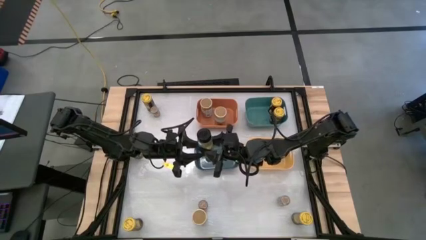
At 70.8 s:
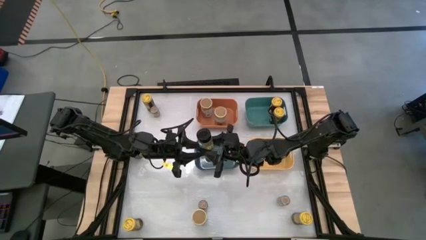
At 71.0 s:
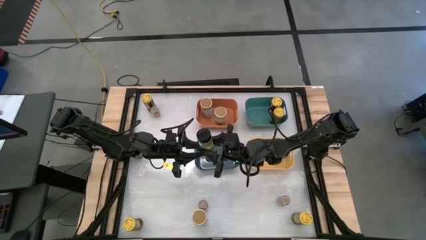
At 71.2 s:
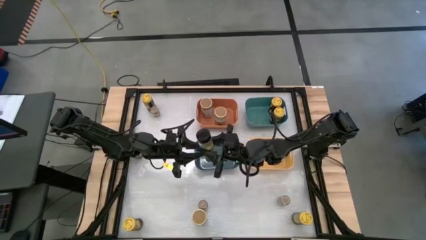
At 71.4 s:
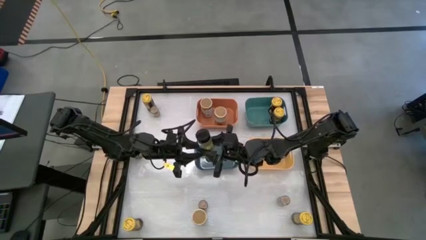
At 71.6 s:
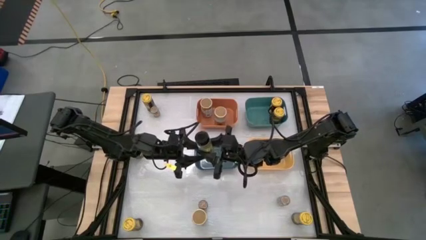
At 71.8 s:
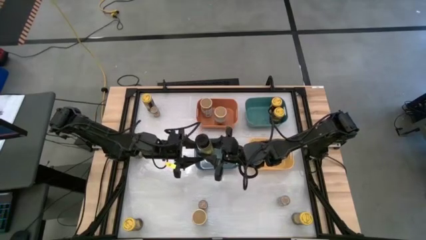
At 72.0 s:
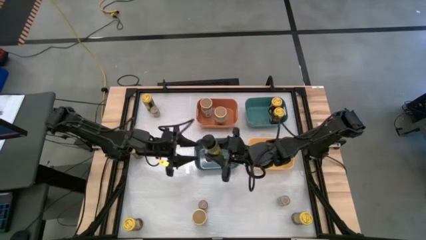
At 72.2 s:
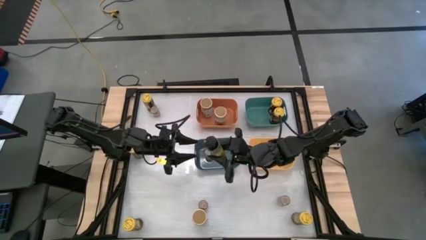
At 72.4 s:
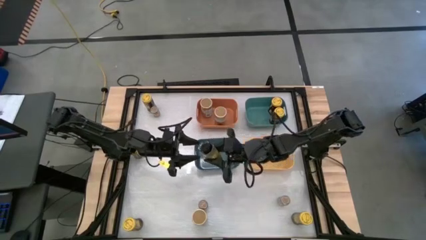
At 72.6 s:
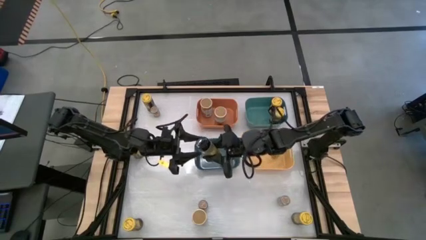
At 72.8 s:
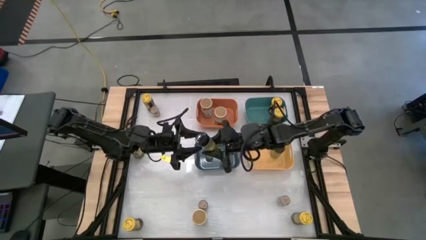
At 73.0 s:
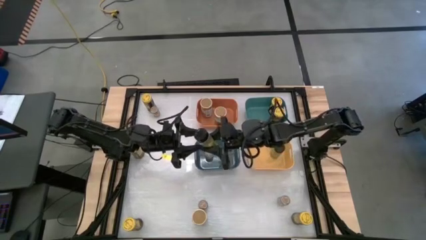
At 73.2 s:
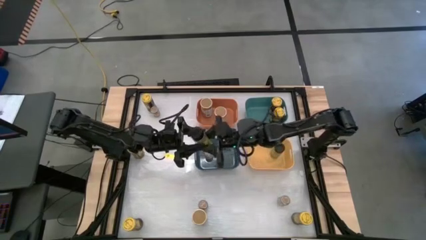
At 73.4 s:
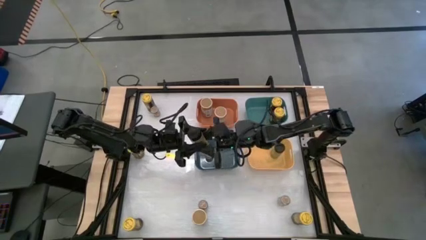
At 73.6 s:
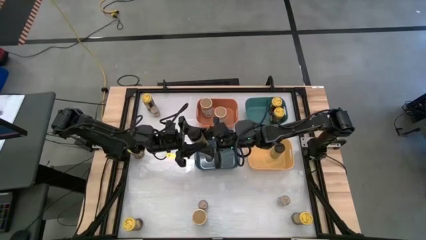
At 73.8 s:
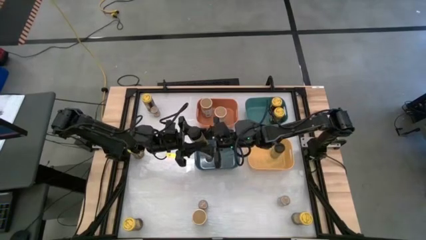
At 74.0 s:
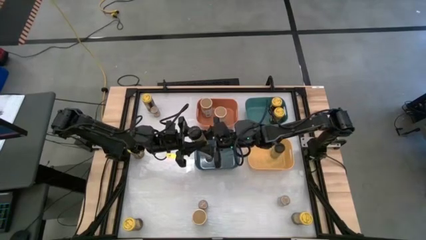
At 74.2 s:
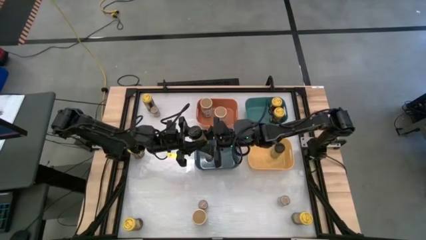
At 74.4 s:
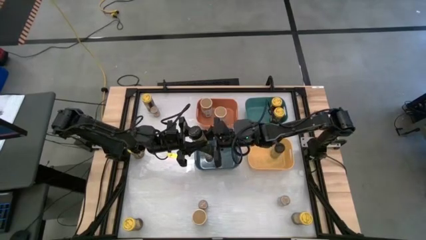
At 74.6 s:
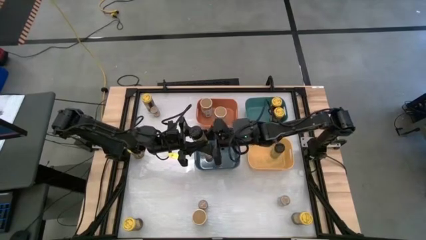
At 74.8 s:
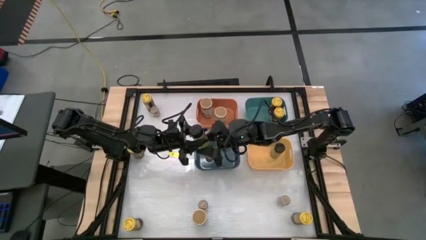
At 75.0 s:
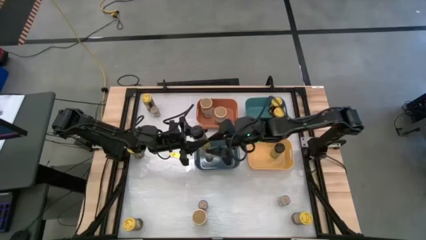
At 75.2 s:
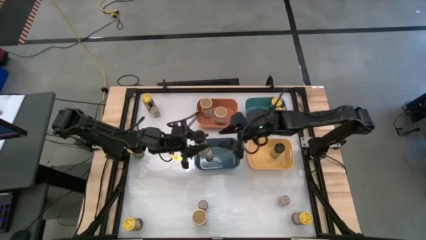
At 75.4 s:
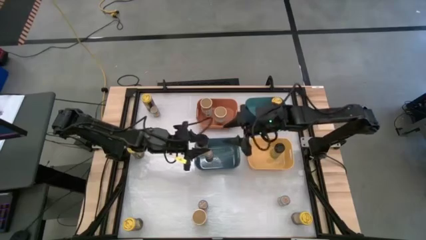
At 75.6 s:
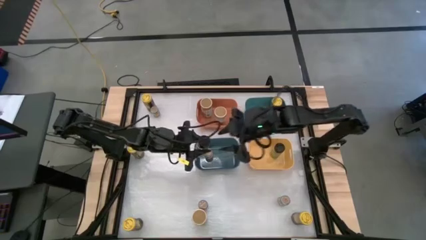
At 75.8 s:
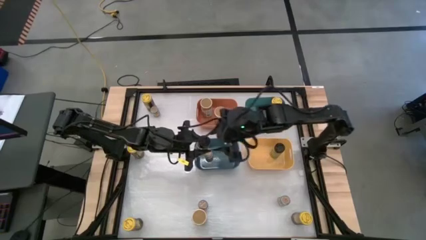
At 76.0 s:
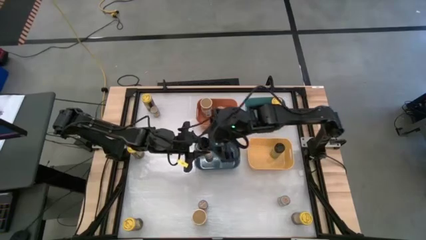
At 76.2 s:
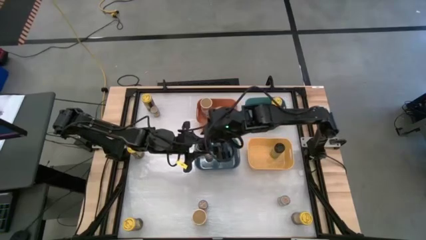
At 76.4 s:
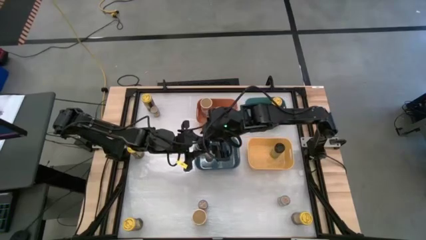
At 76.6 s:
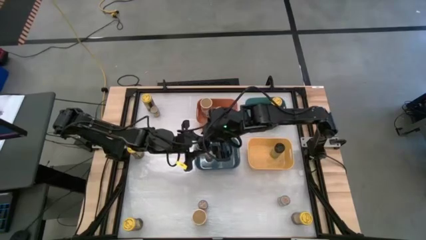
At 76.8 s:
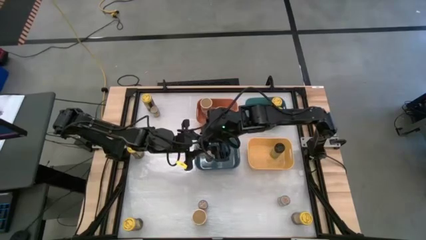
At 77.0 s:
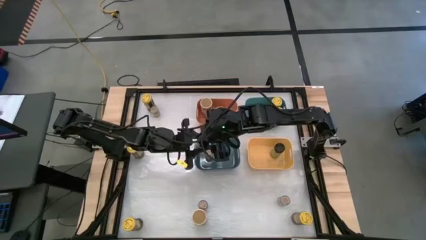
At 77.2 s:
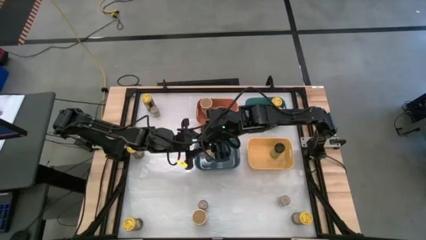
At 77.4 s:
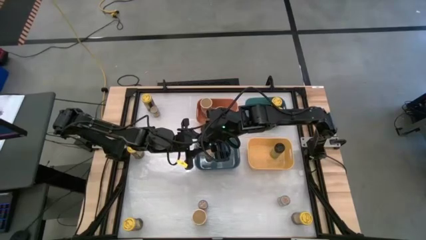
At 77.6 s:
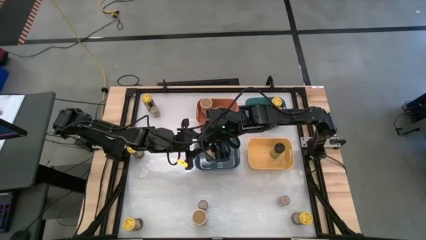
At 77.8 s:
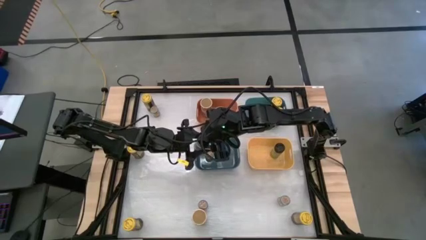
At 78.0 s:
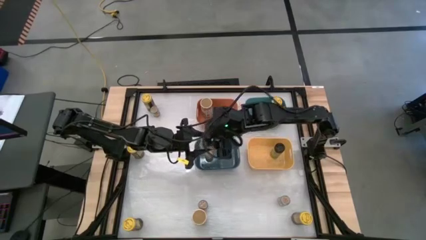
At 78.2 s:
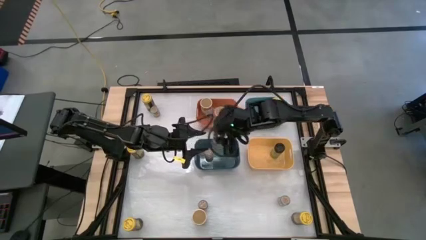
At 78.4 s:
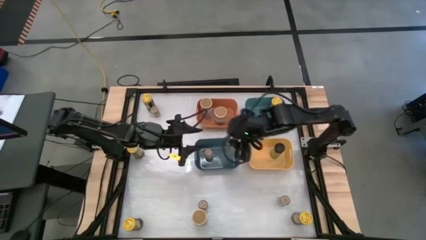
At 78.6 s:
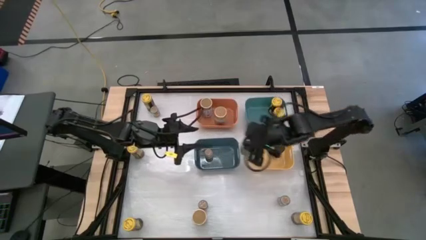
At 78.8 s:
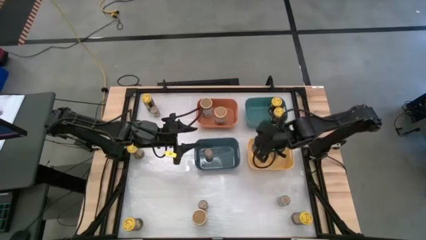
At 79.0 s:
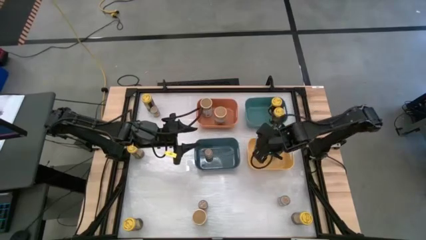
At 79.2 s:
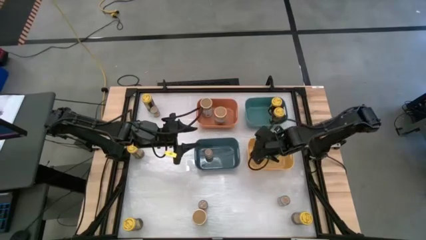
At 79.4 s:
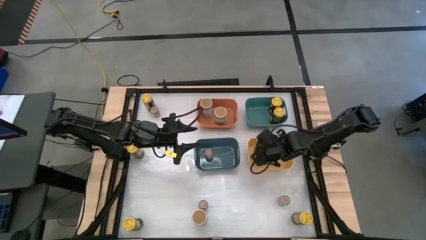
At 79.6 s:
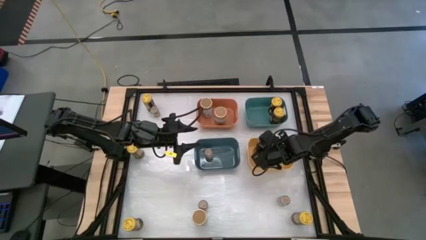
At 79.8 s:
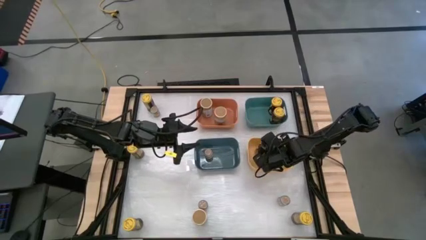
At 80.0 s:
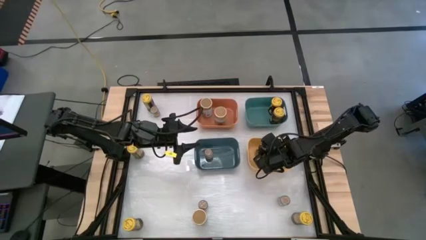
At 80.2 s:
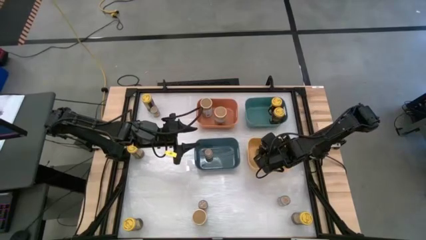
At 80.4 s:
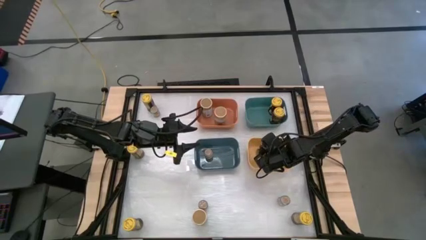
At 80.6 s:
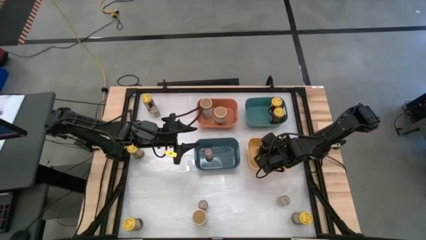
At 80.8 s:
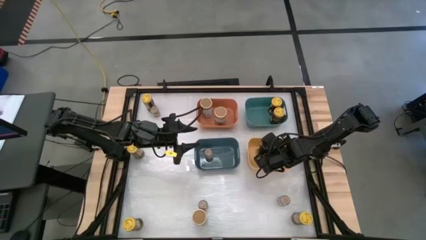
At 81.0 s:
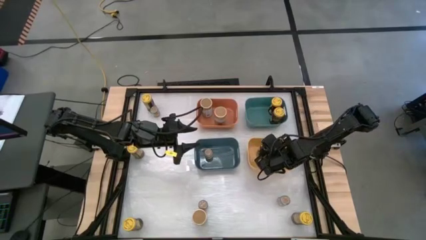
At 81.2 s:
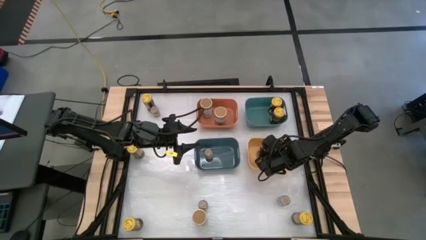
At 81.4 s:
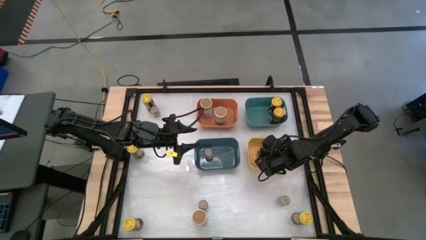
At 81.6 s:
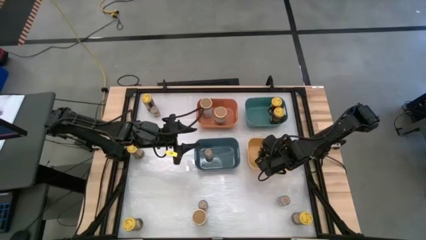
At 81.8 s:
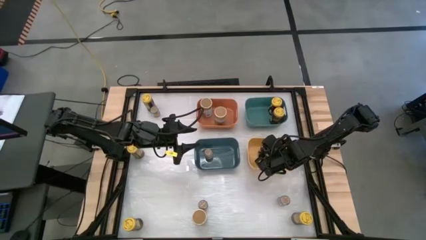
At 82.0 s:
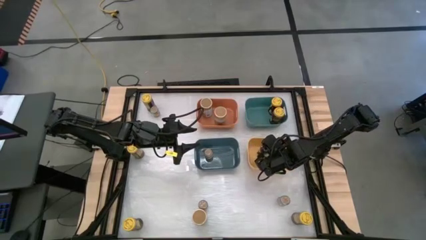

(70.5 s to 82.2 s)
Task: Sort spices by type
Put the black spice bottle into the yellow bin

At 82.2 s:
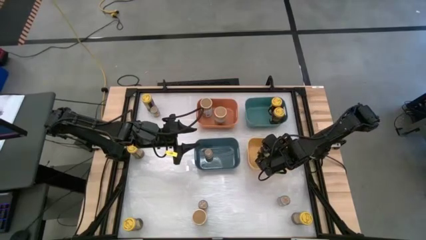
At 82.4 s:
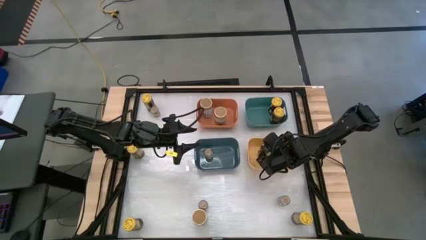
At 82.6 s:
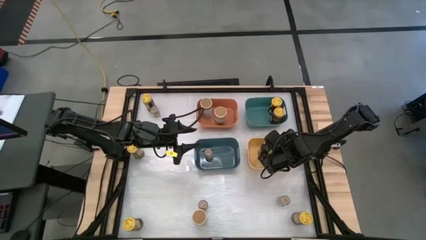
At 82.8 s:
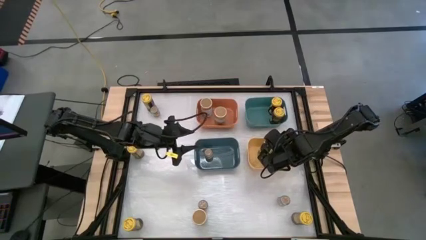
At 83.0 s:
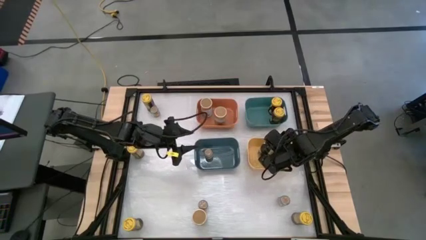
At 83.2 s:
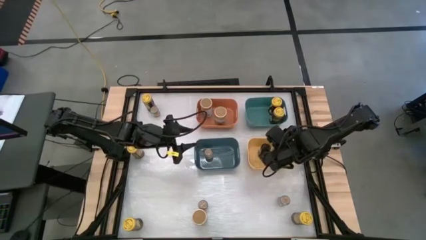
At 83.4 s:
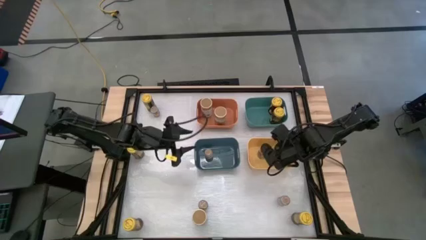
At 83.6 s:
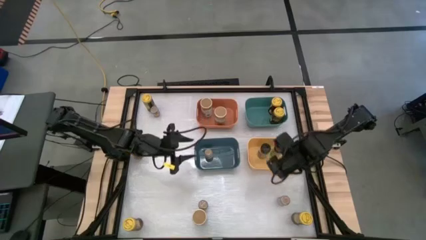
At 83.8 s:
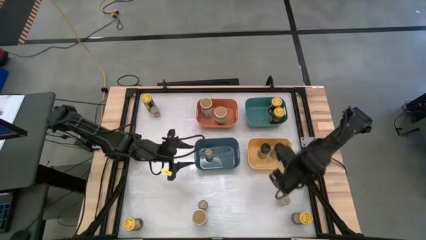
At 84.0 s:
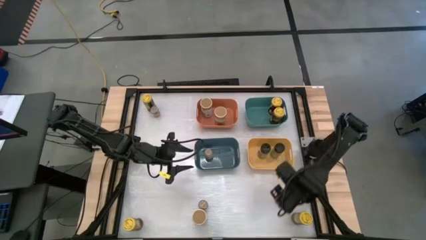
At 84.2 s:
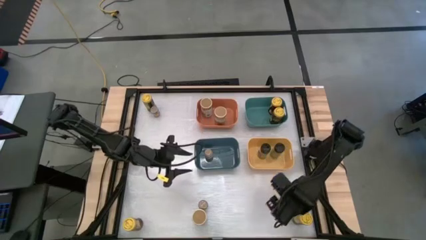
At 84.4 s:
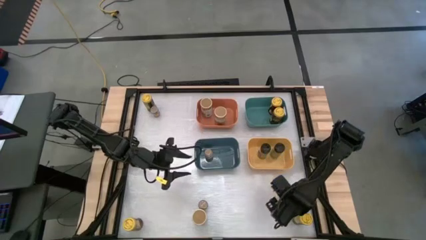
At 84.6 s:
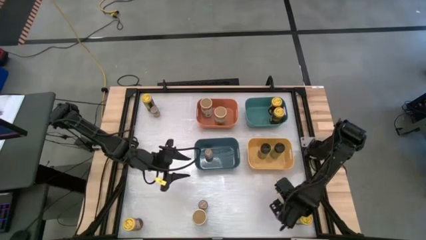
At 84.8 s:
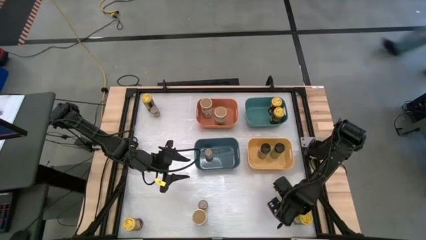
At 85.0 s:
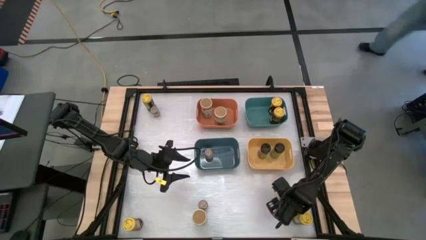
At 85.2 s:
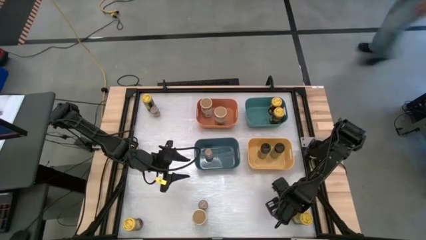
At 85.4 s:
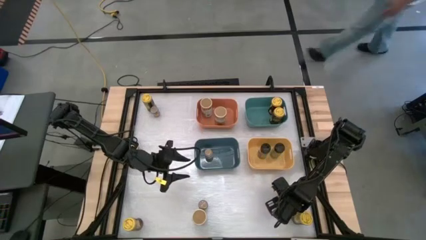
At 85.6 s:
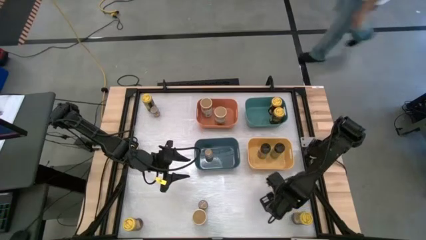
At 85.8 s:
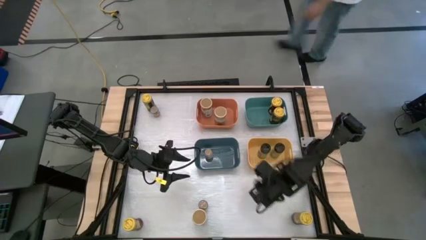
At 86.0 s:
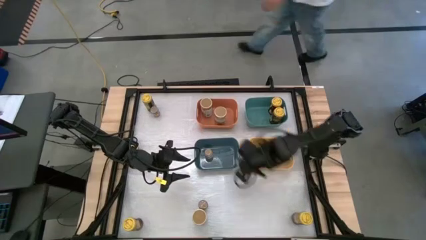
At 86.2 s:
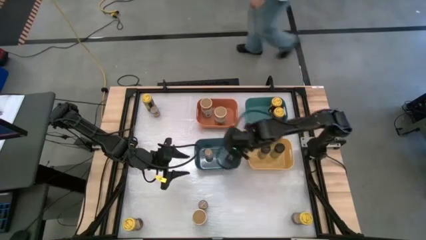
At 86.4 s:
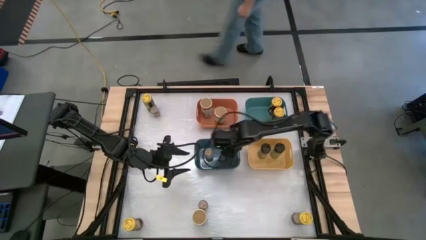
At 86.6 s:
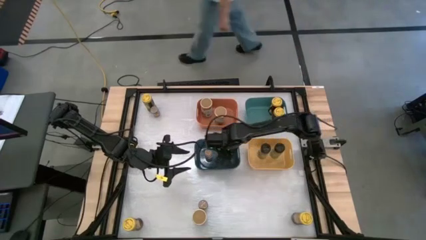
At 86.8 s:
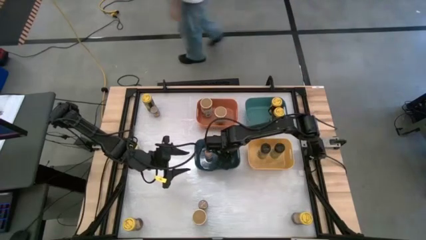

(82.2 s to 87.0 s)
Put the brown spice bottle into the blue bin
